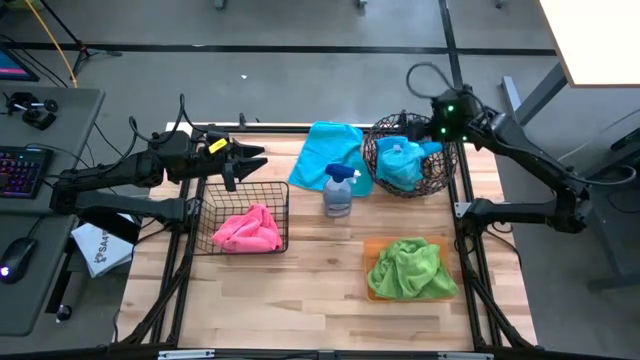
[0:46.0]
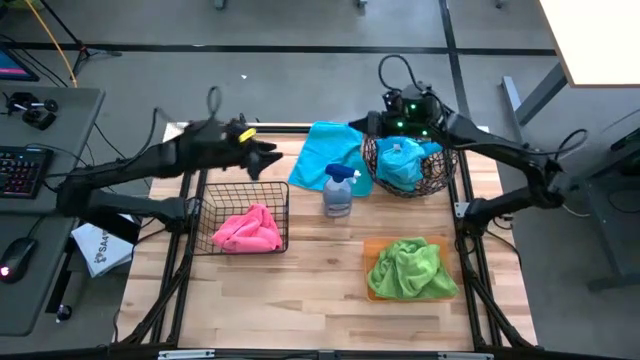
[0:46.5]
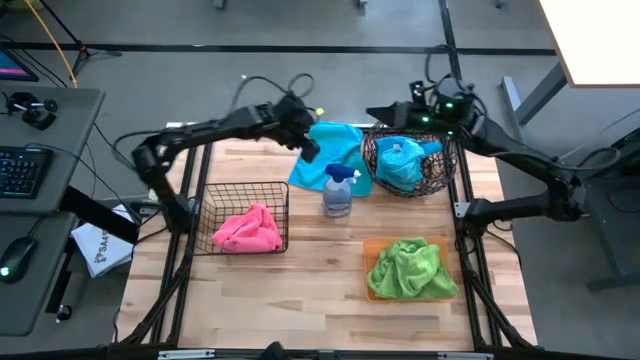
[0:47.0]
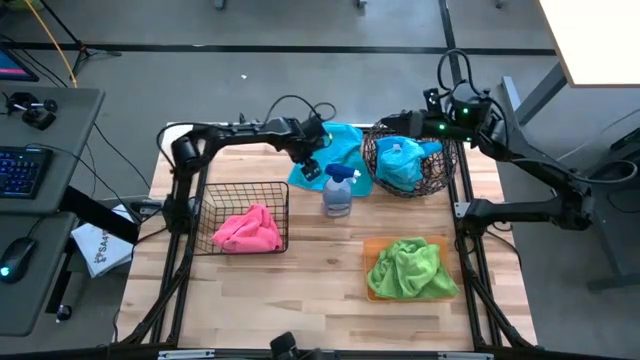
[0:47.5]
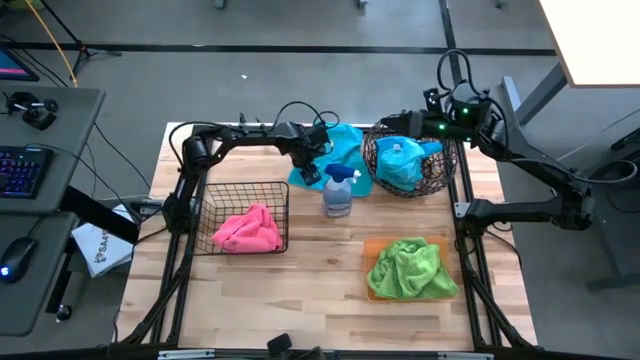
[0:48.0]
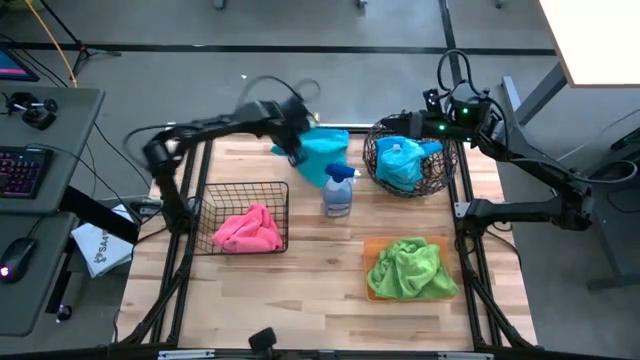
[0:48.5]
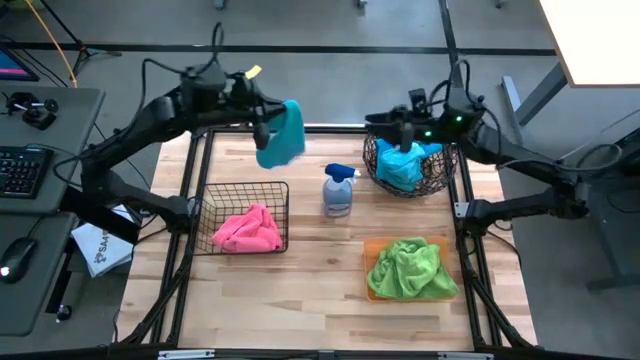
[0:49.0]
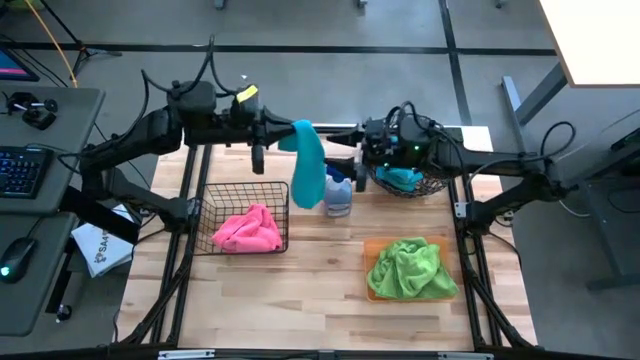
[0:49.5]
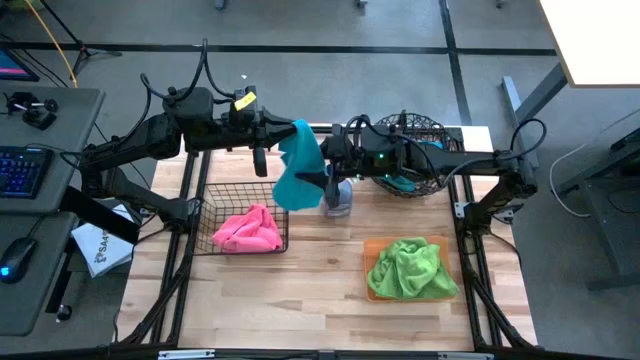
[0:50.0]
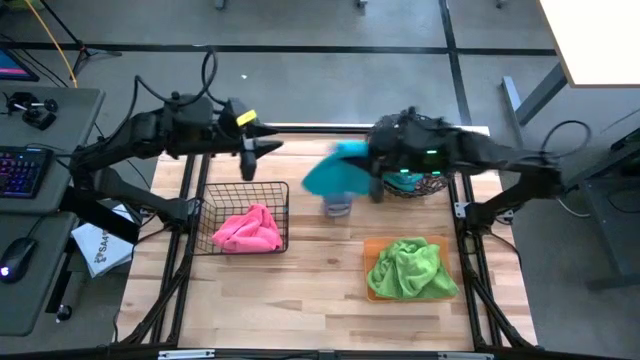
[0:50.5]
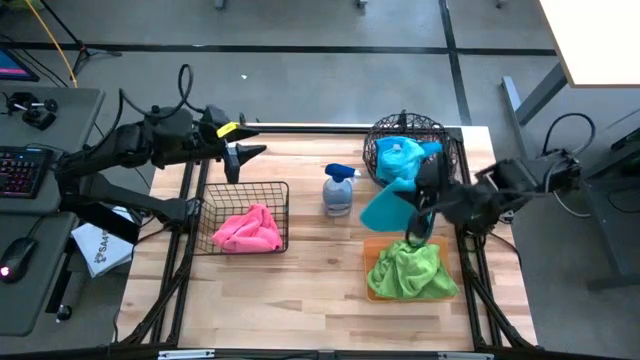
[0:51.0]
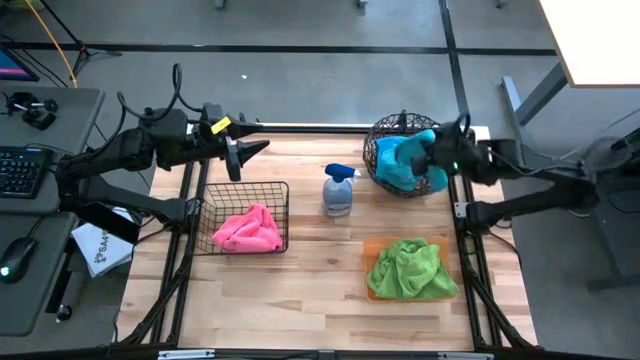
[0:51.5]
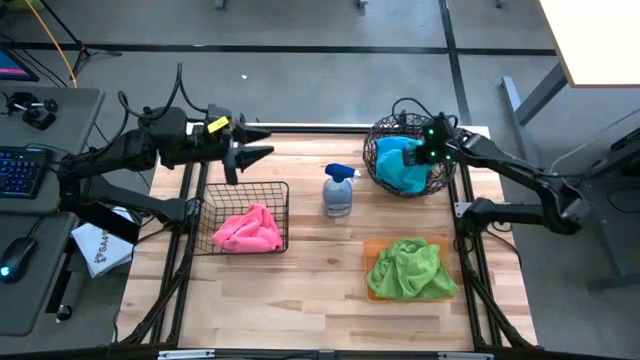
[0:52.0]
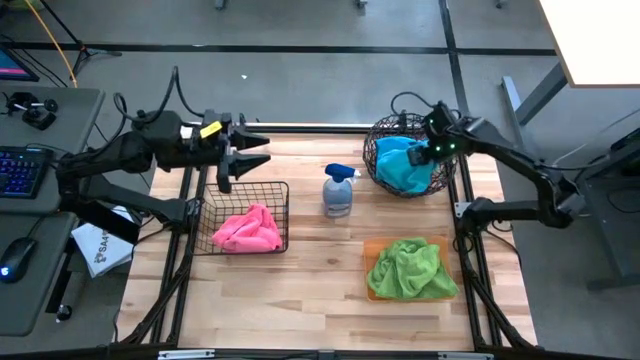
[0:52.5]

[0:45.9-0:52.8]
Task: Sort microfiber towel by color & place in baskets
Put the blue microfiber cloth into the right wire basket

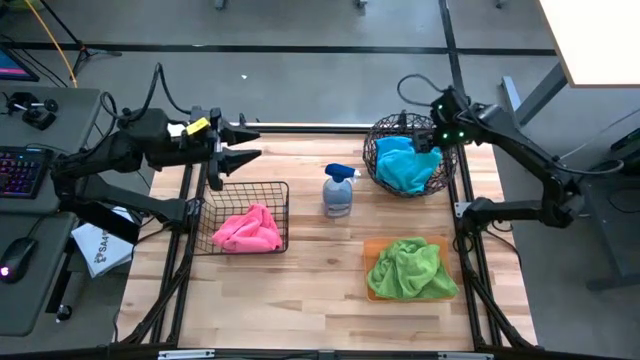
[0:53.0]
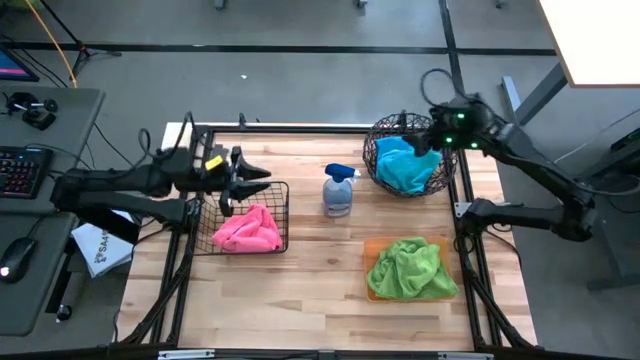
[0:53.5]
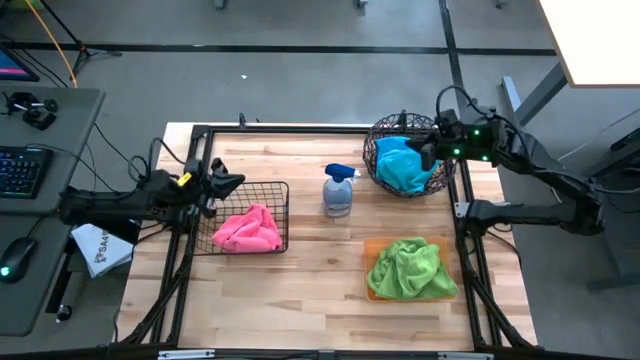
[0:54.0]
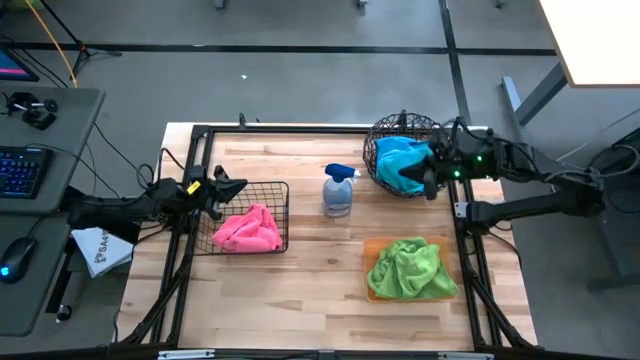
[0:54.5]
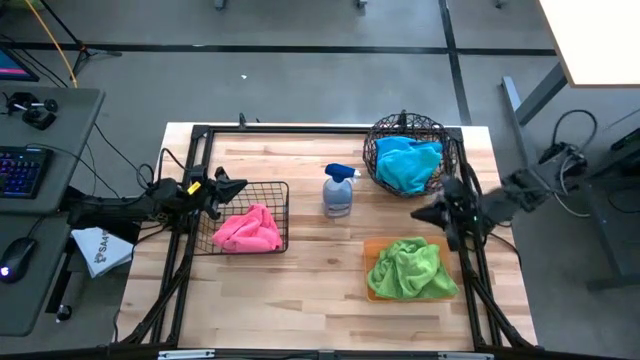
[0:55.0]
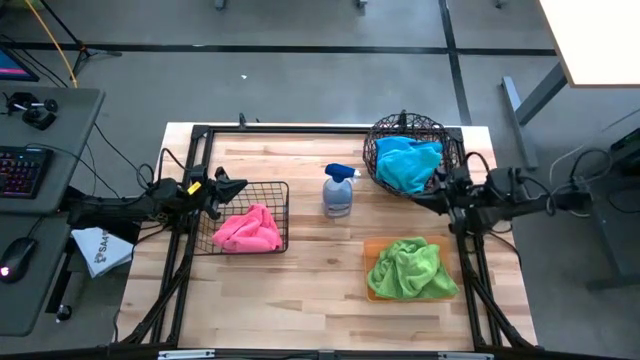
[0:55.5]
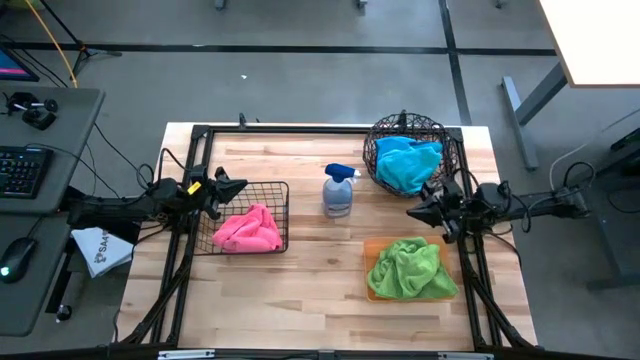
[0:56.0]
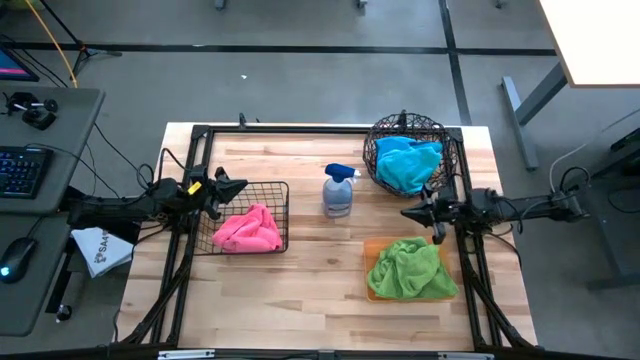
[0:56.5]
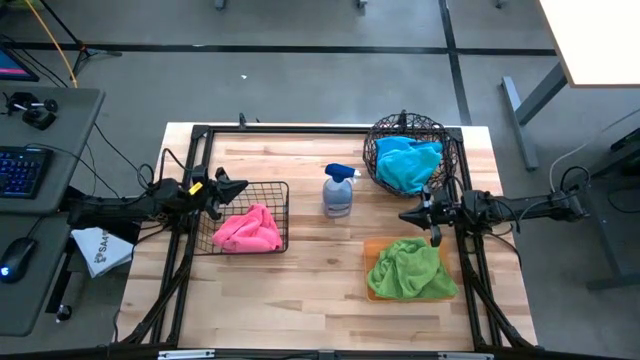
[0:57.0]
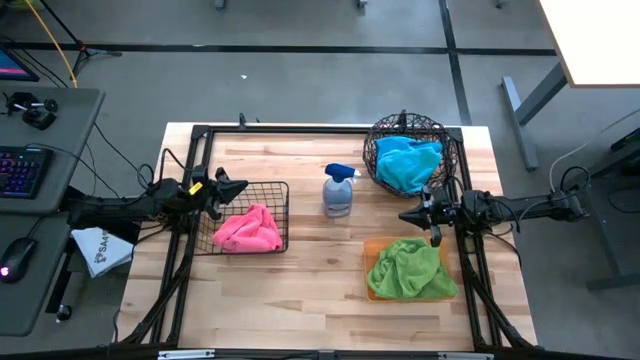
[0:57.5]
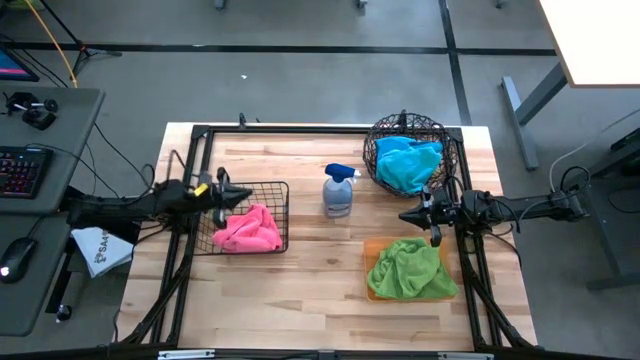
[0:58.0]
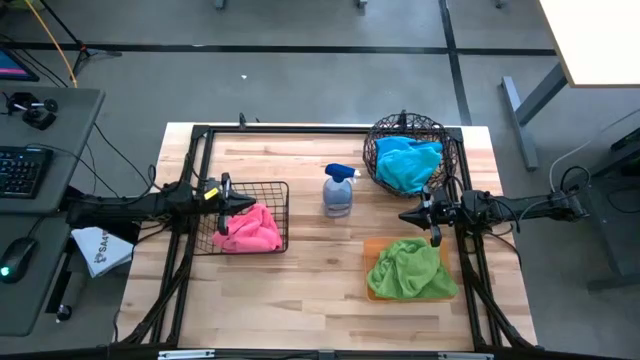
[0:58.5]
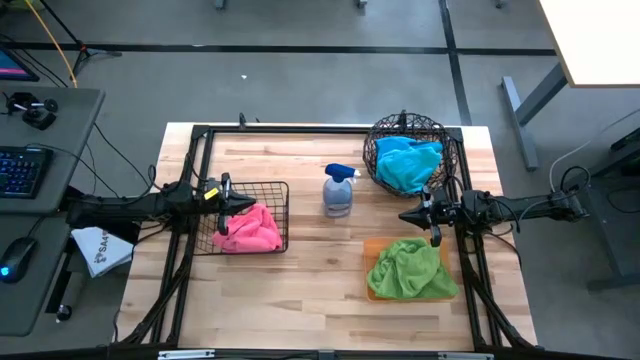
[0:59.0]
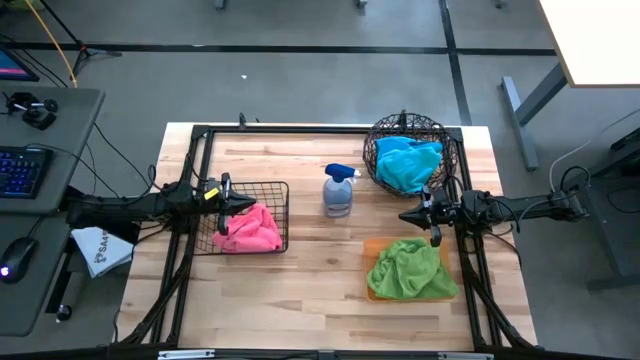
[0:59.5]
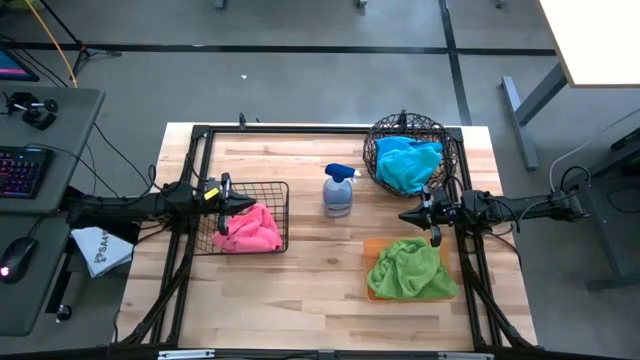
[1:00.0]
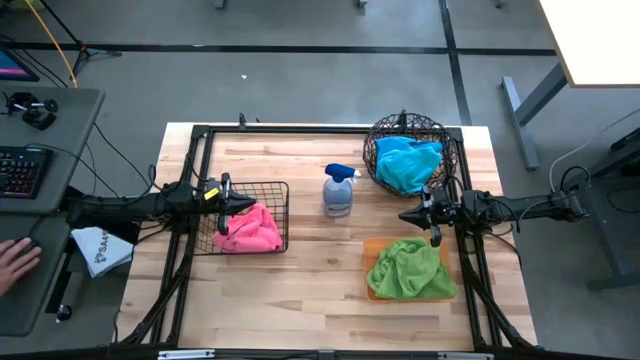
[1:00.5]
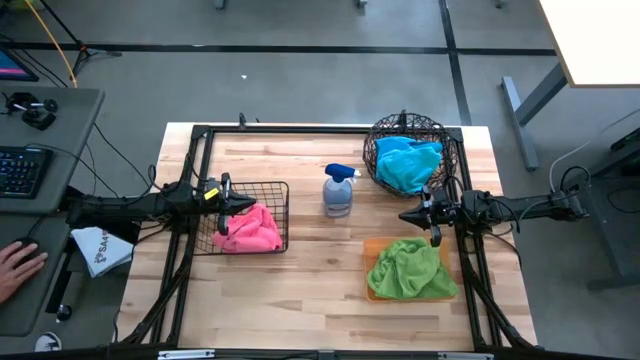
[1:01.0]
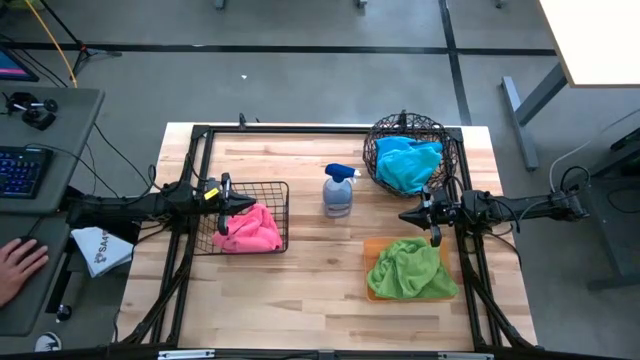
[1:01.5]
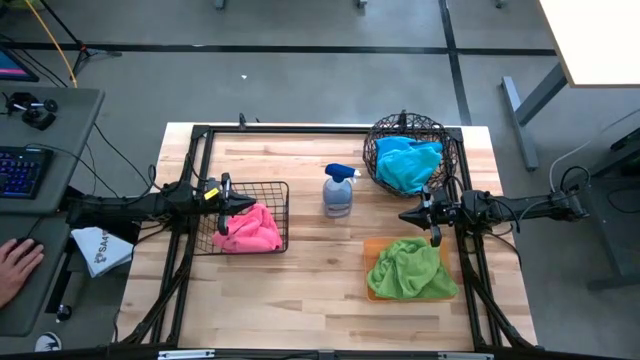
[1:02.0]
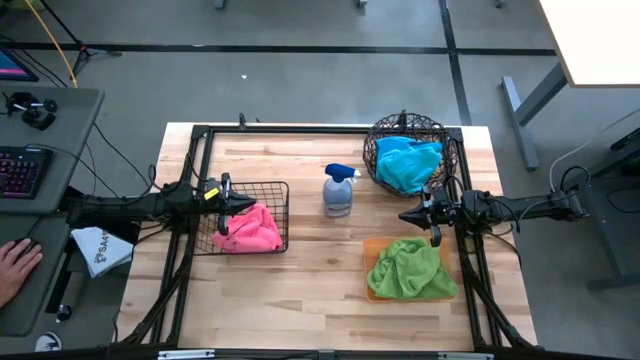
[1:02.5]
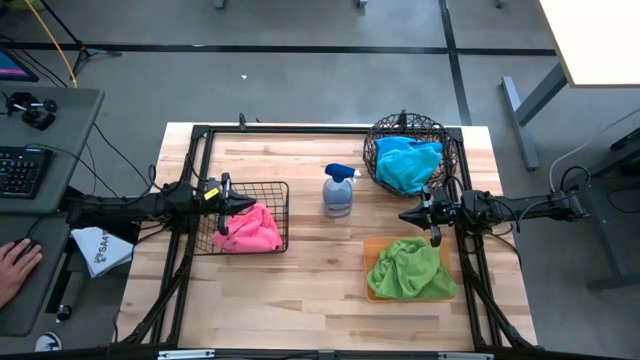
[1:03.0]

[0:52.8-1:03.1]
Return to Home Position

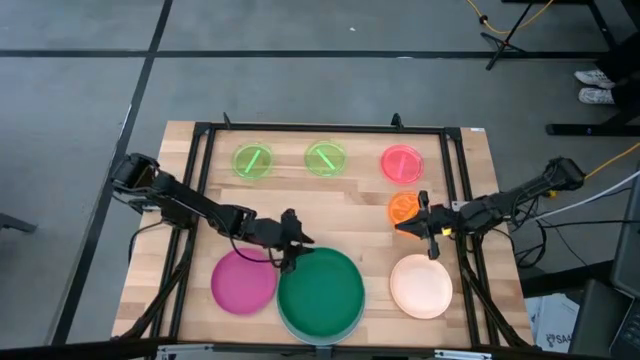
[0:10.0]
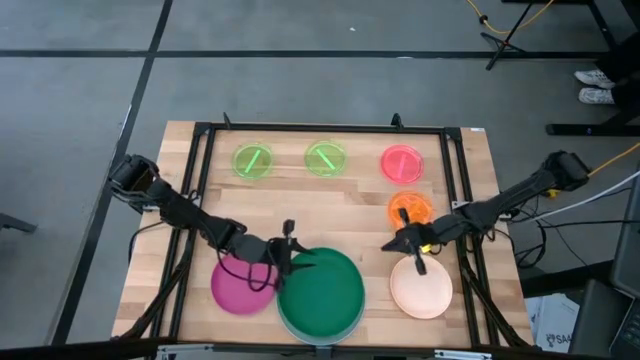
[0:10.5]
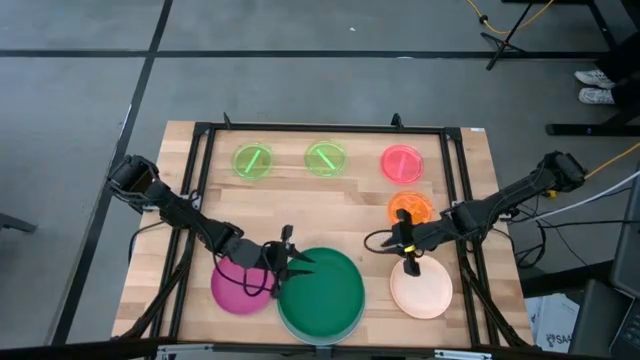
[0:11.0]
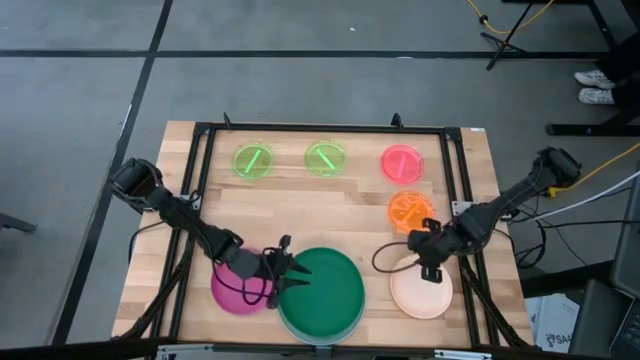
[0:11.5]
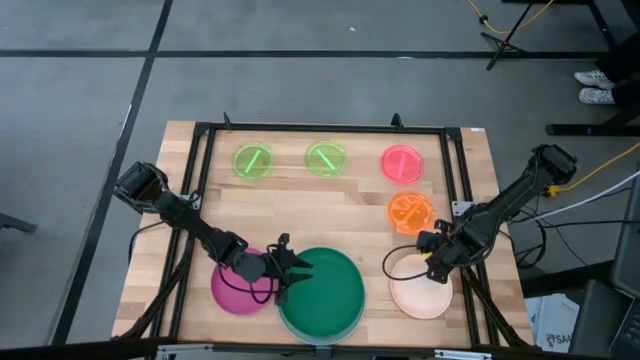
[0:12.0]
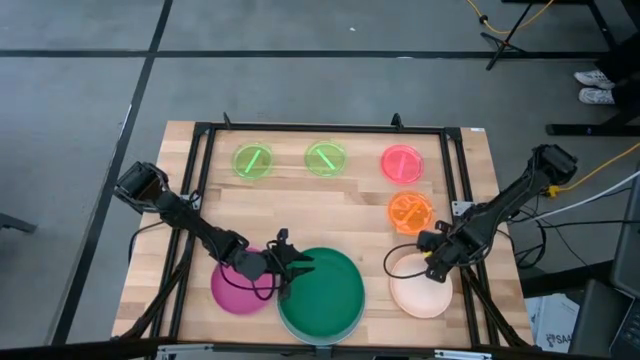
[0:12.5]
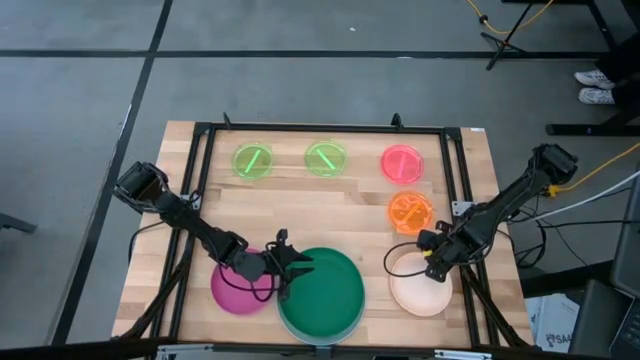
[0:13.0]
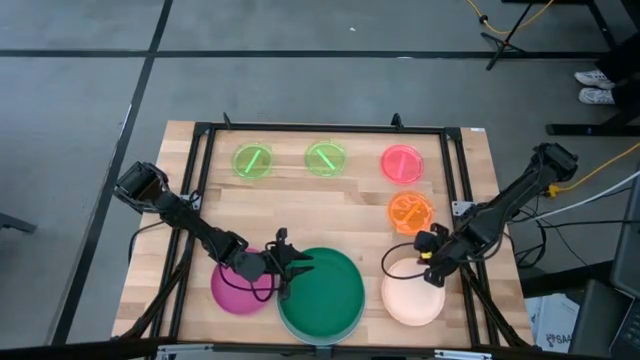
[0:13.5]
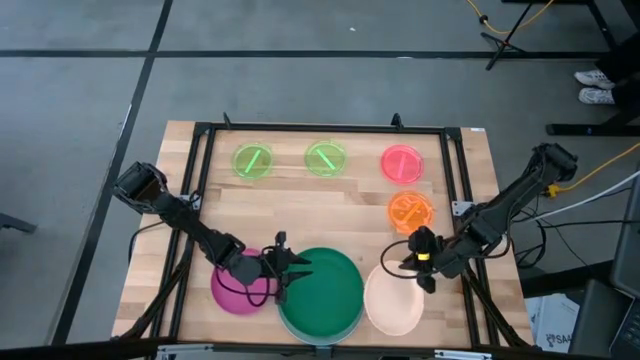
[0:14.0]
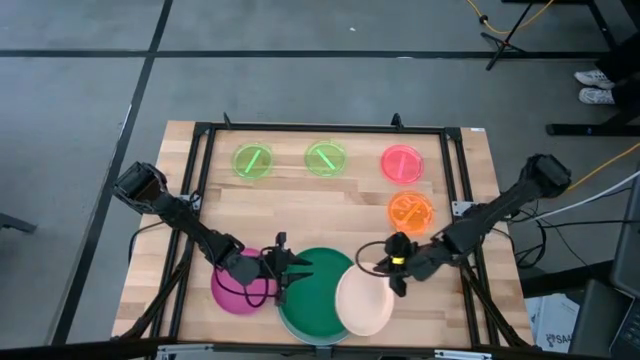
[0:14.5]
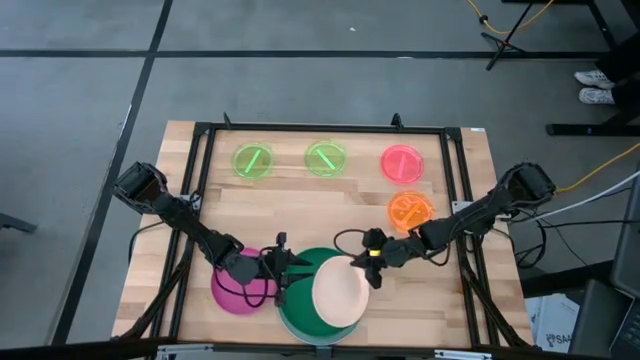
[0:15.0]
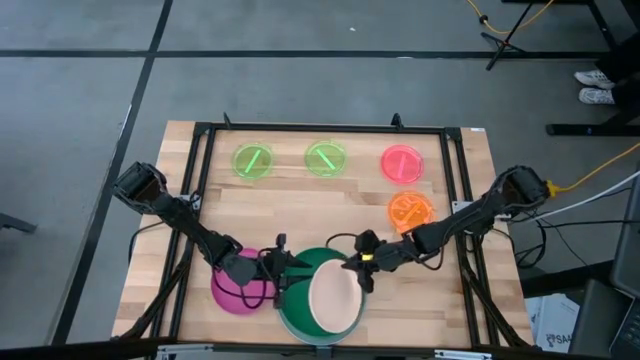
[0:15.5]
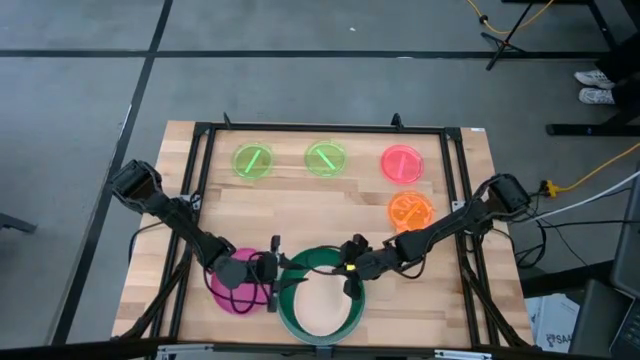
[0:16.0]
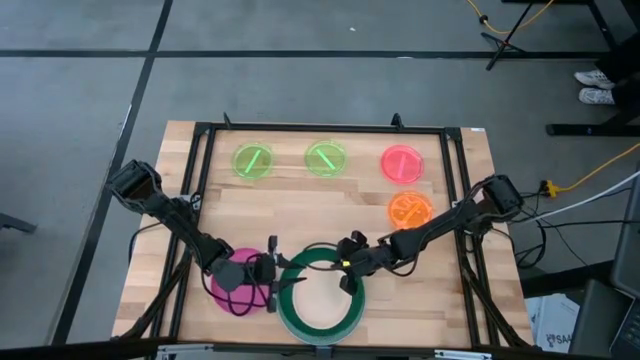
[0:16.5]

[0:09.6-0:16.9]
Task: Stack plastic plates
Stack the light orange plate on top of the green plate
